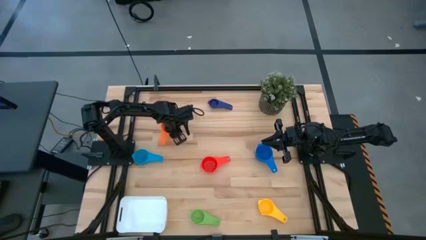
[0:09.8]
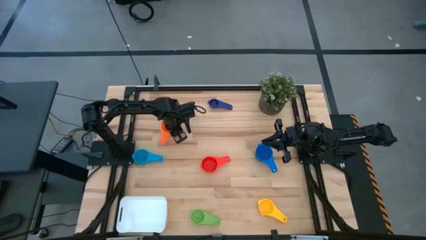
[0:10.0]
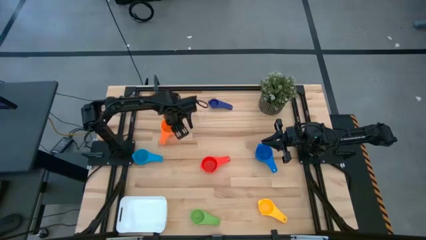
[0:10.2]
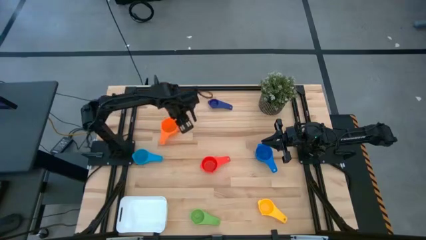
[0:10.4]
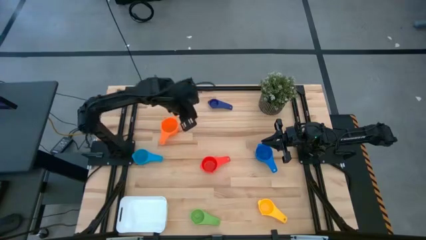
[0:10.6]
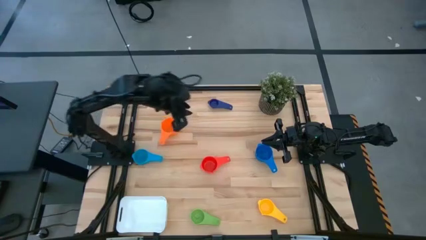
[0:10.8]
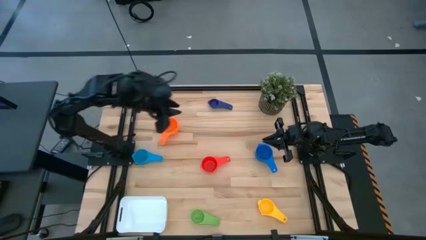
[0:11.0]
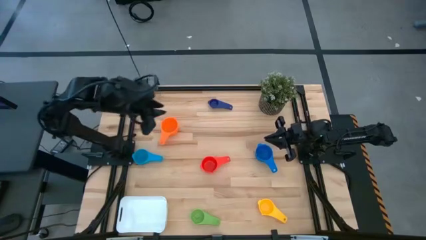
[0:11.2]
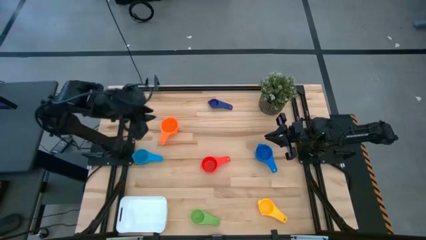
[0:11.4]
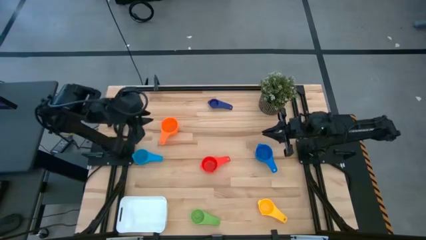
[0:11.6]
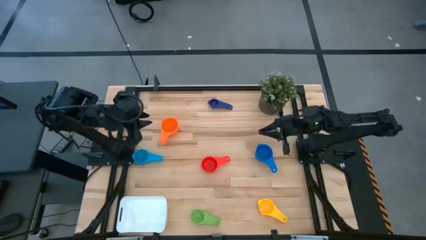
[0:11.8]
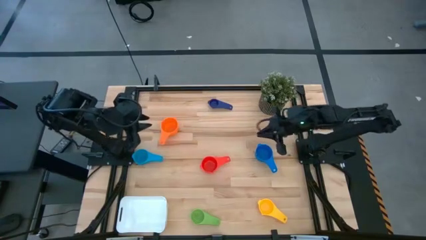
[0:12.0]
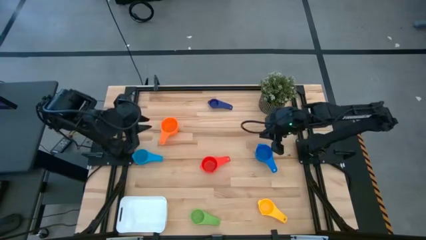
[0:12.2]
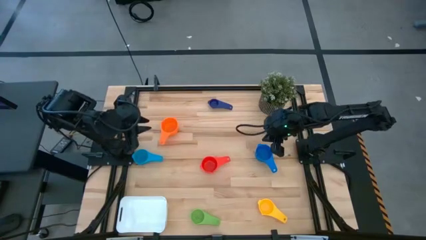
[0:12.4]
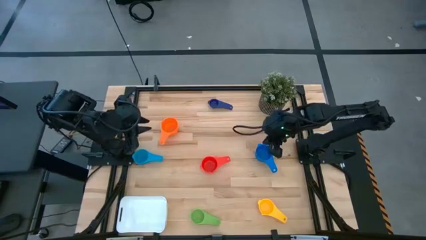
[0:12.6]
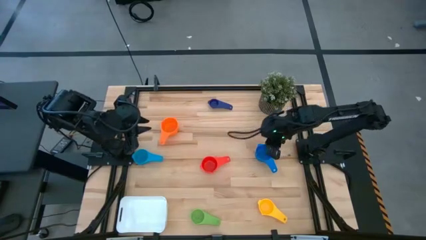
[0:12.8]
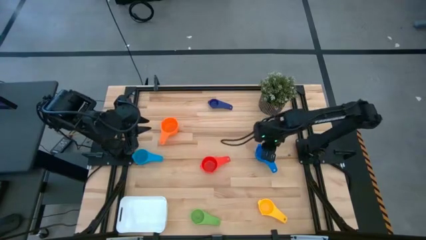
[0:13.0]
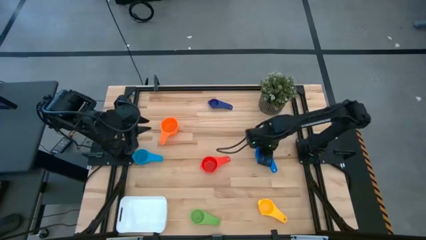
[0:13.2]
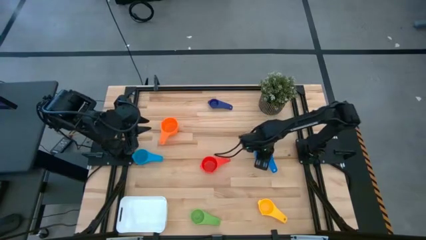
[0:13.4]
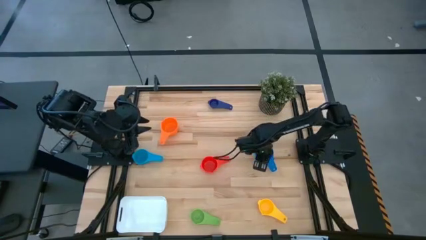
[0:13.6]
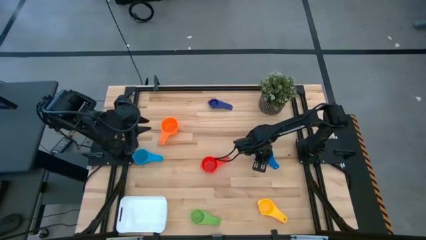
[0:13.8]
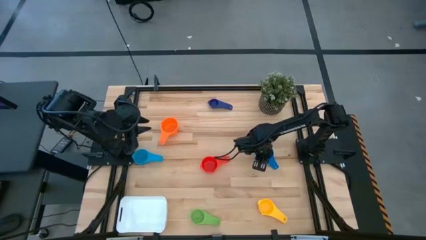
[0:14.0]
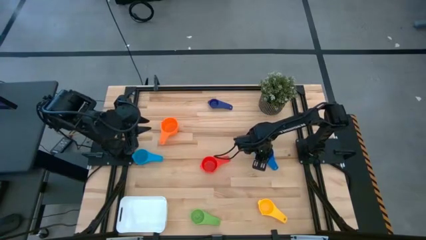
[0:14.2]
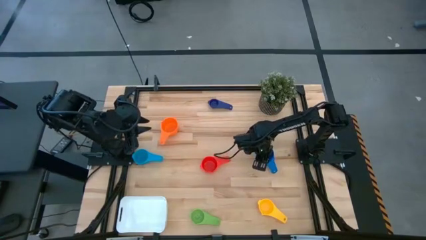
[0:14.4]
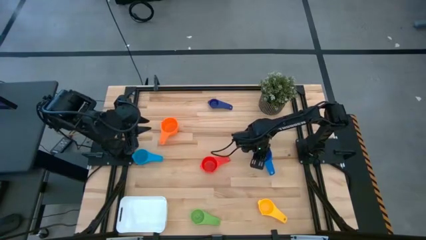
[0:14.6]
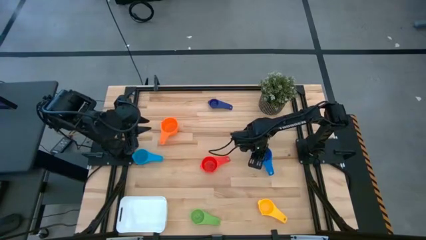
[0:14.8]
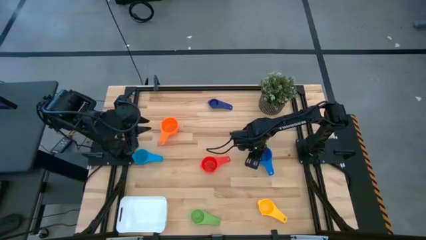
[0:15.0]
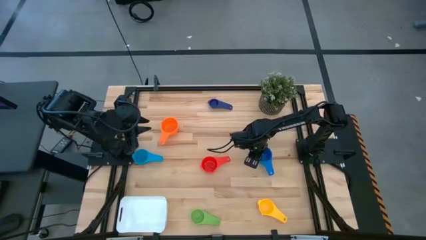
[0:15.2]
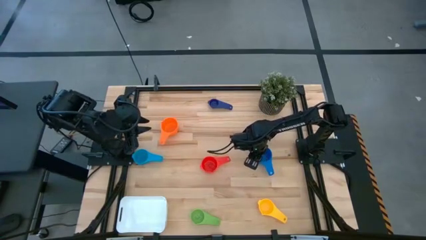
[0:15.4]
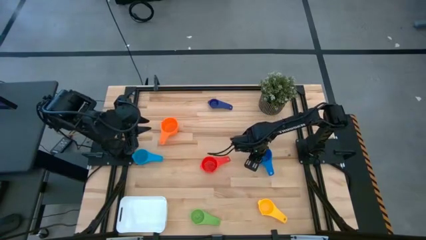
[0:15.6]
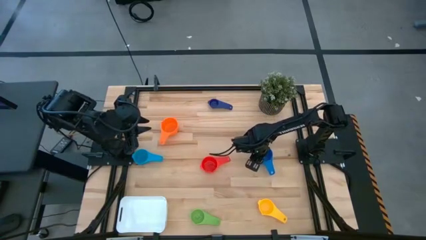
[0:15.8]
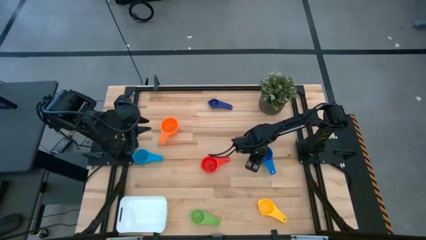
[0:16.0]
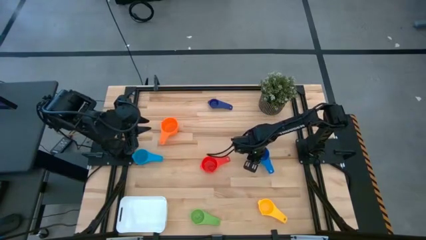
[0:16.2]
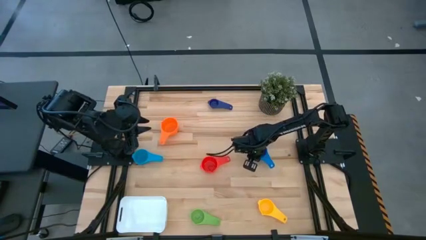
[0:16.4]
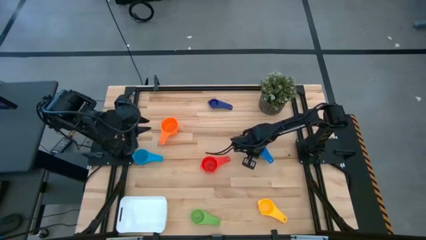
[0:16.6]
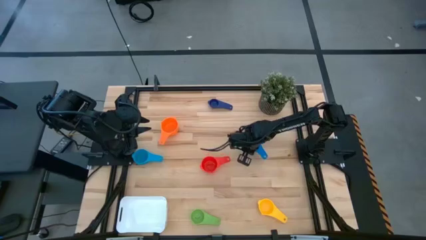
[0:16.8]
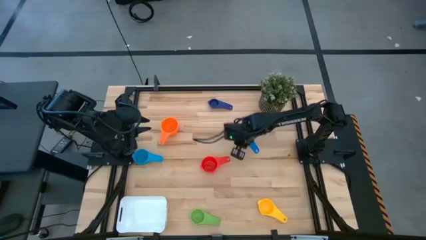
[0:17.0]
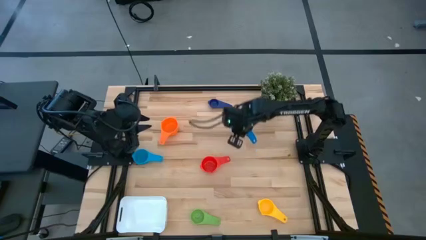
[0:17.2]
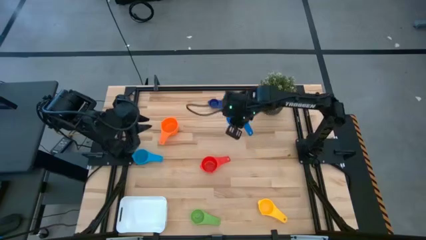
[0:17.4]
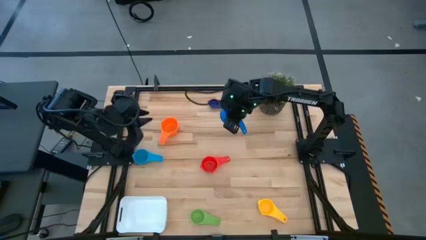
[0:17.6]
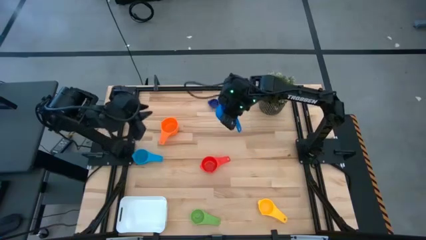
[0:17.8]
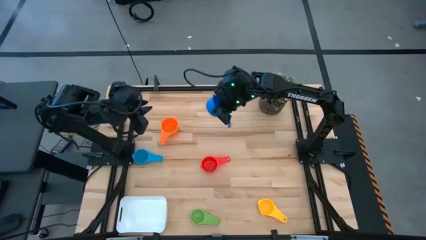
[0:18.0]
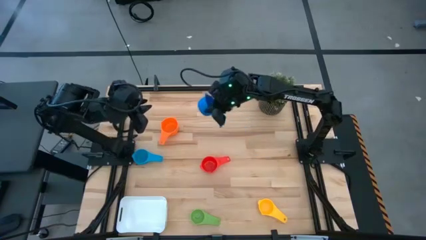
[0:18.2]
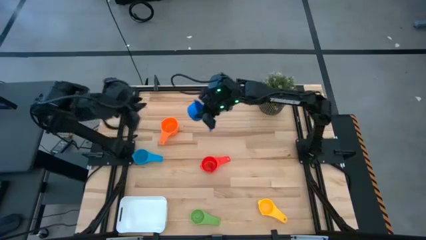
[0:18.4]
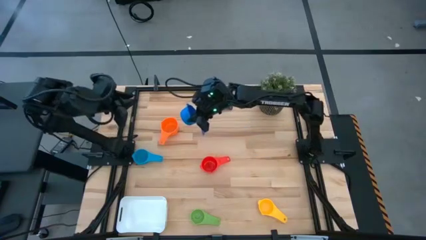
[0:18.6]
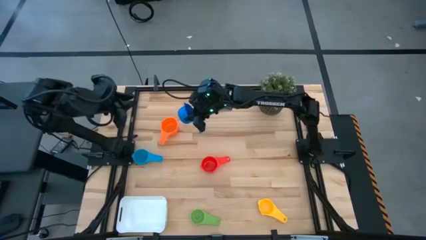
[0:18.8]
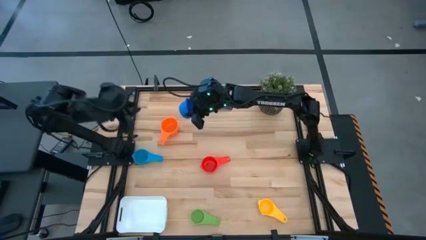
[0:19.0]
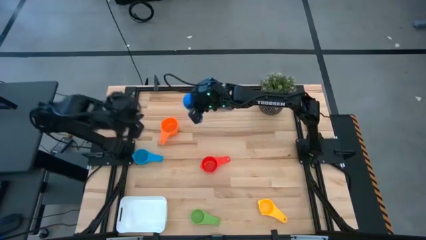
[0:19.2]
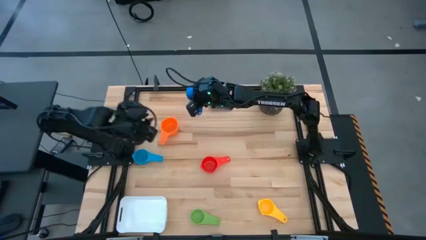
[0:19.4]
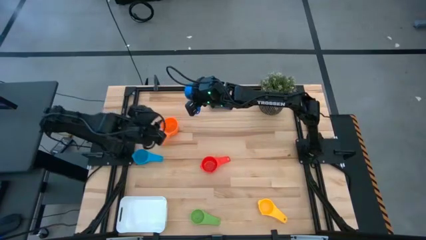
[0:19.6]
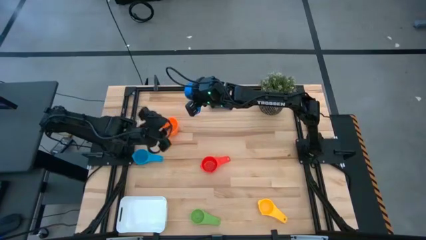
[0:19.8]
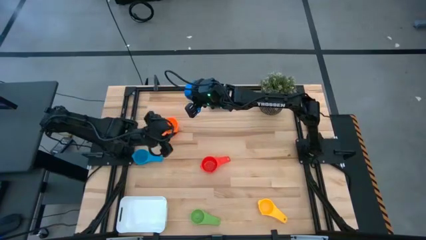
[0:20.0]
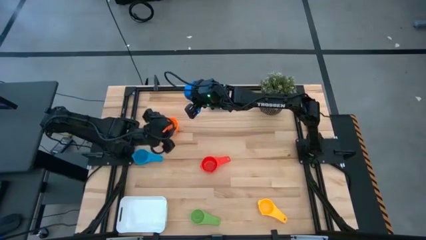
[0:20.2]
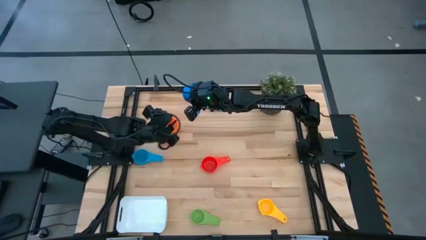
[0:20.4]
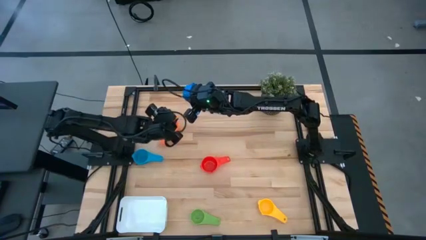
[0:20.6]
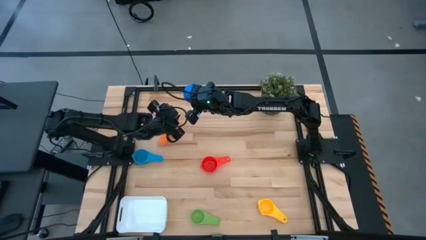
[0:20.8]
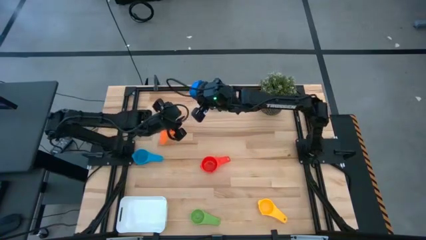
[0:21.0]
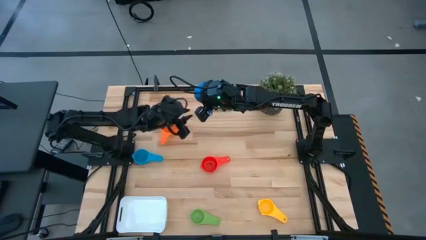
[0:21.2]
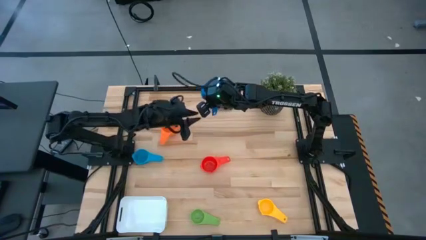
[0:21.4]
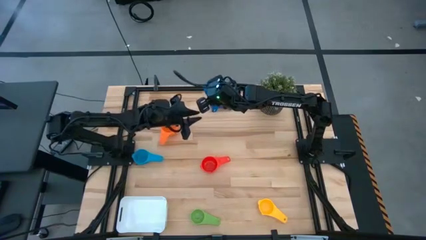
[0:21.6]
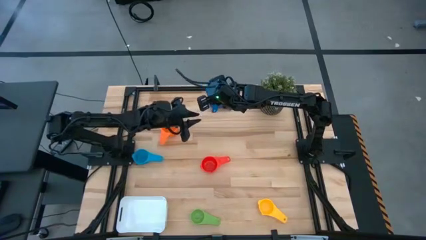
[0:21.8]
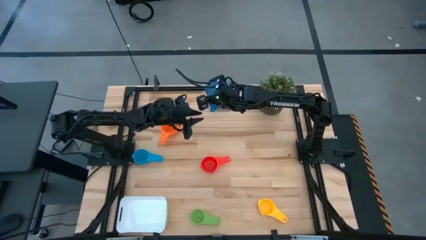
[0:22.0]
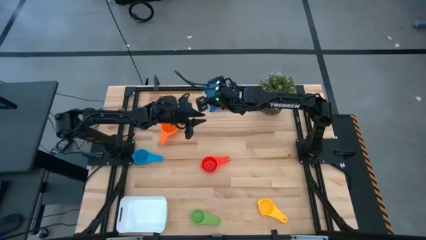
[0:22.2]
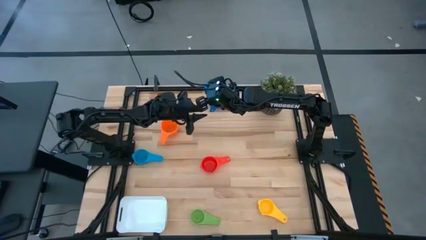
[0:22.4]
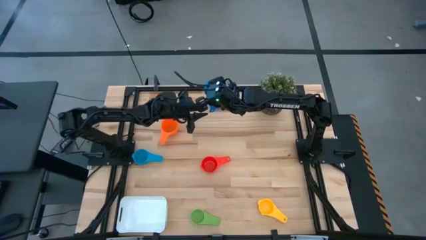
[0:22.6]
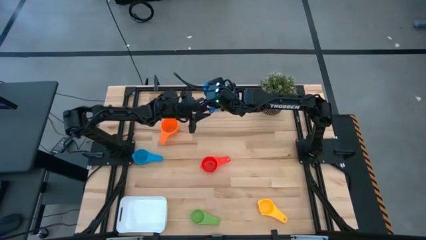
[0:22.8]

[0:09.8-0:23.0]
Task: Nest measuring cups in basket
Stack the dark blue measuring cup into the orange measuring cup

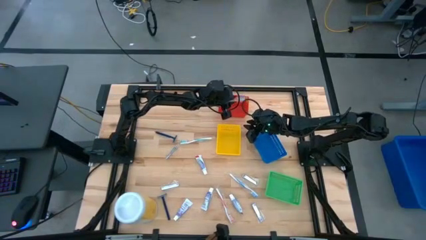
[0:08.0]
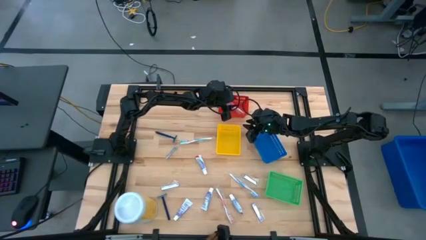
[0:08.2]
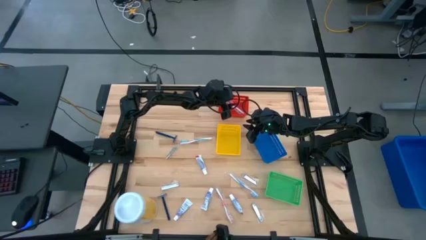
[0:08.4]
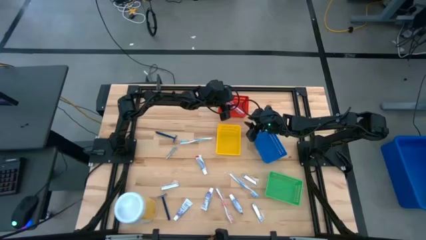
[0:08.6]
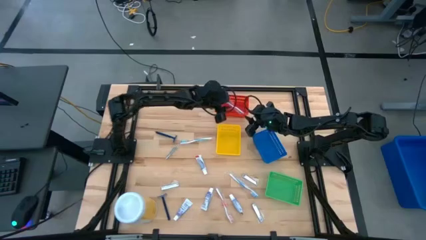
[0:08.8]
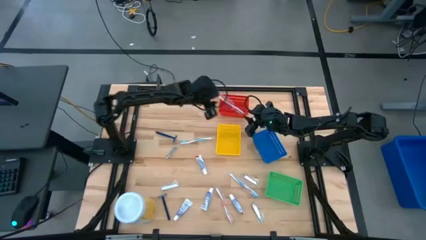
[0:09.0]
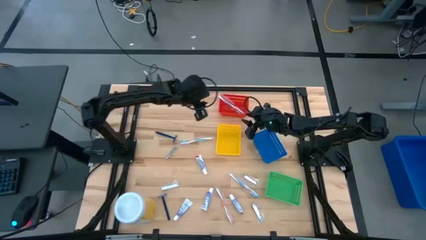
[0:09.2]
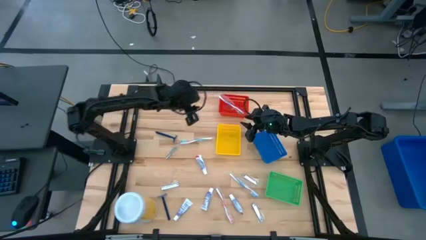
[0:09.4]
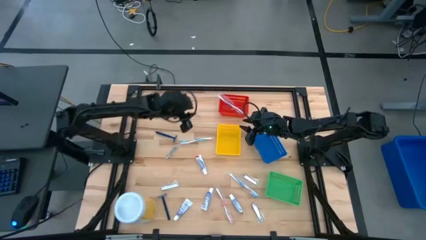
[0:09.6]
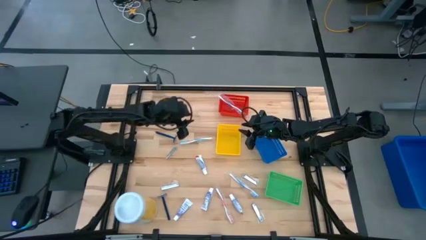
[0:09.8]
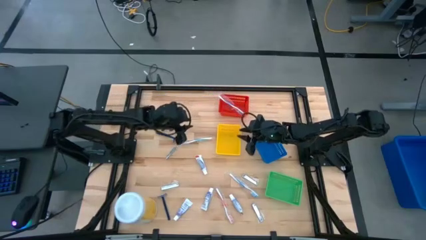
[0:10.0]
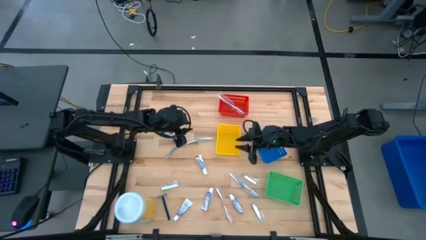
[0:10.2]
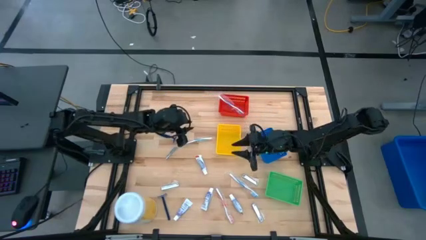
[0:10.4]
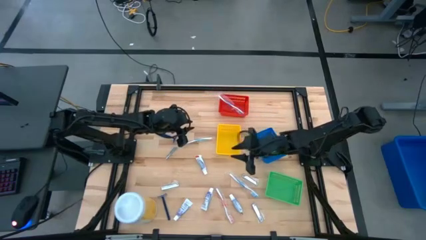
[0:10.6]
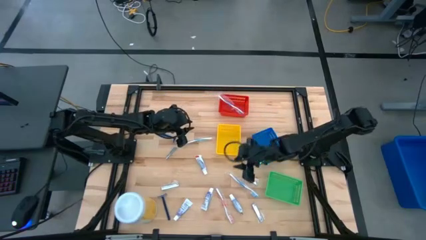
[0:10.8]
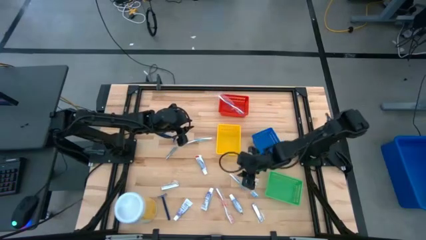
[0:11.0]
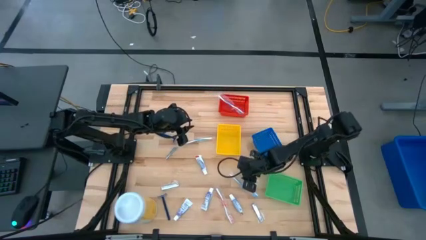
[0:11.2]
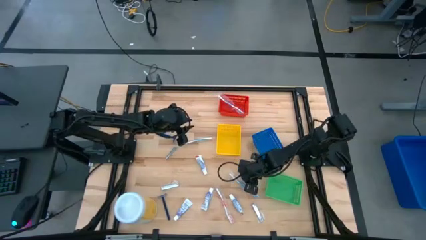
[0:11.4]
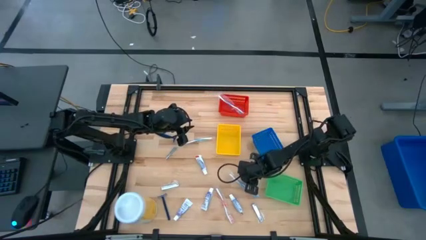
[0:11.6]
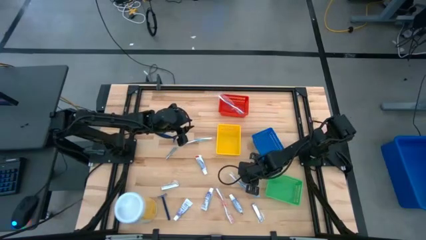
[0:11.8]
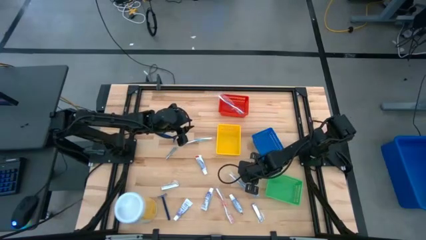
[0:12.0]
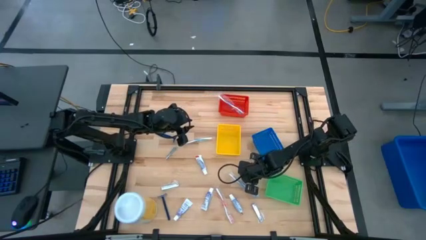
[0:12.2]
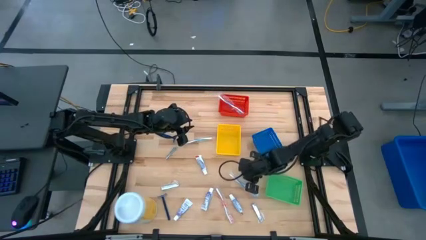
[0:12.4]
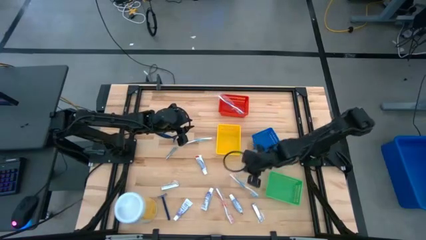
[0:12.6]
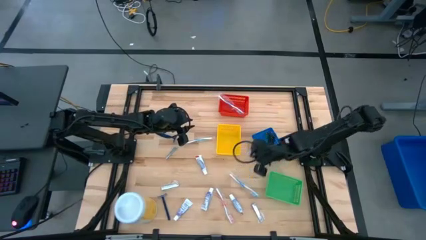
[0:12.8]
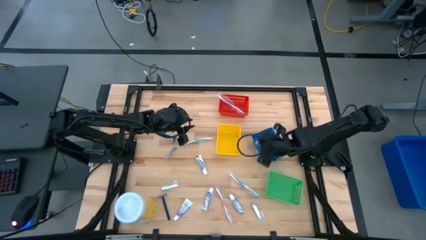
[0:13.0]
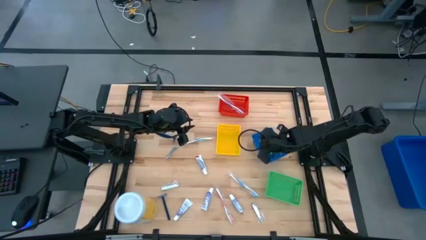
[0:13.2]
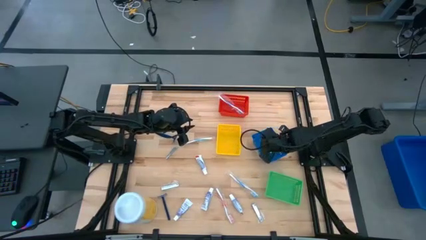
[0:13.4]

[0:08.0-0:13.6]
Task: Pick & Place Travel size toiletries
Put the nail cutter into the blue bin
